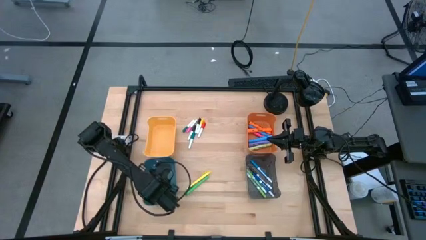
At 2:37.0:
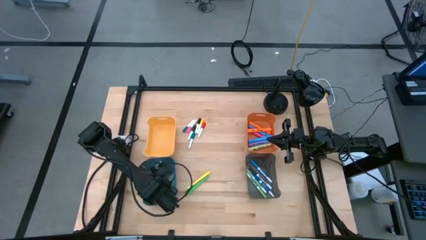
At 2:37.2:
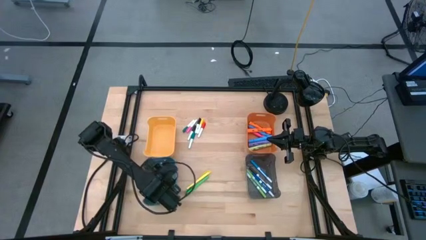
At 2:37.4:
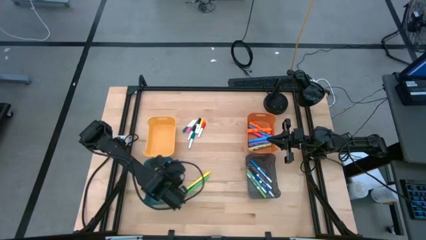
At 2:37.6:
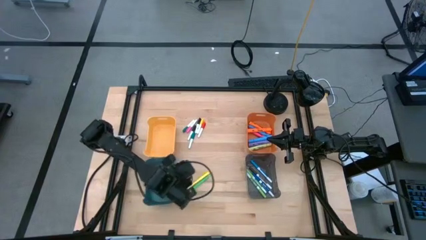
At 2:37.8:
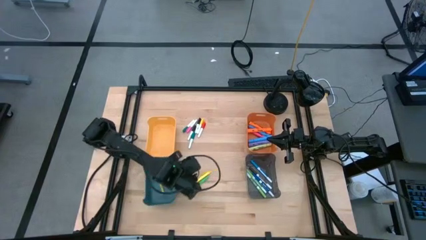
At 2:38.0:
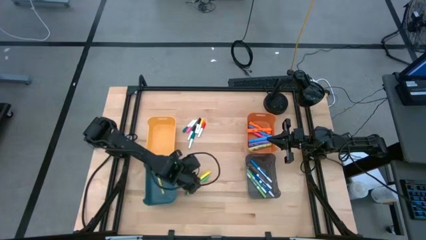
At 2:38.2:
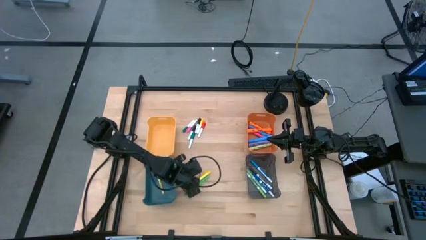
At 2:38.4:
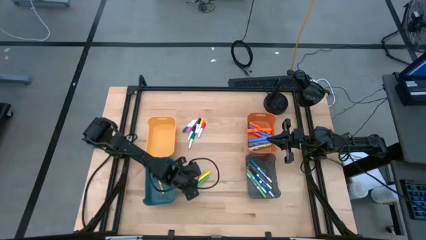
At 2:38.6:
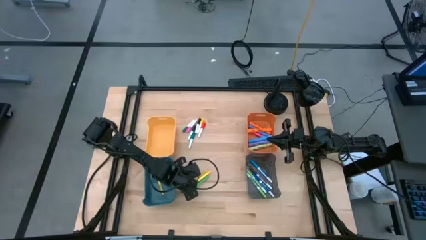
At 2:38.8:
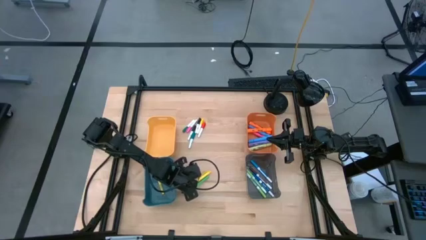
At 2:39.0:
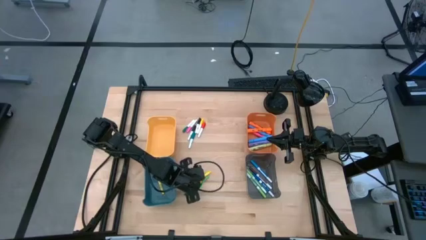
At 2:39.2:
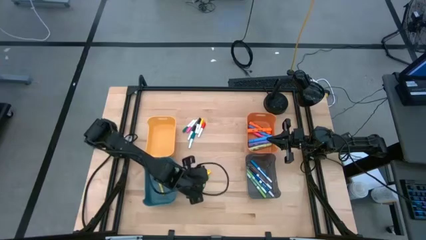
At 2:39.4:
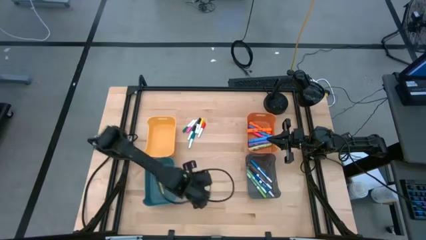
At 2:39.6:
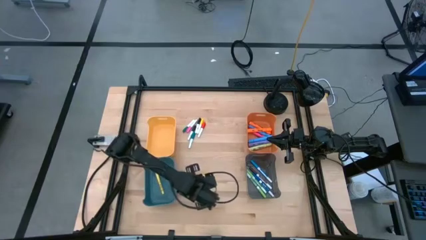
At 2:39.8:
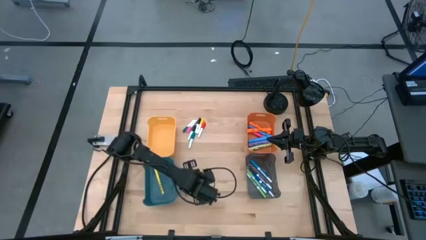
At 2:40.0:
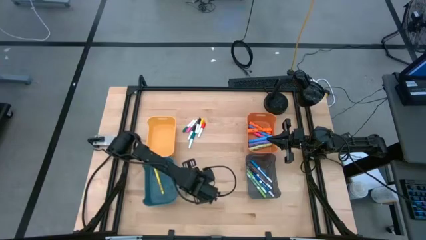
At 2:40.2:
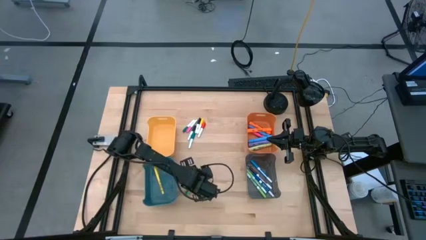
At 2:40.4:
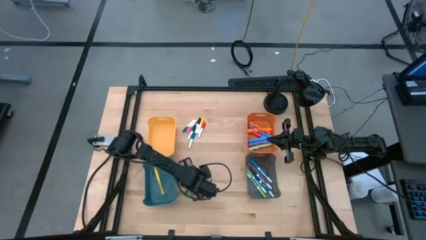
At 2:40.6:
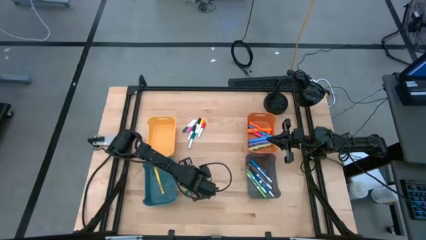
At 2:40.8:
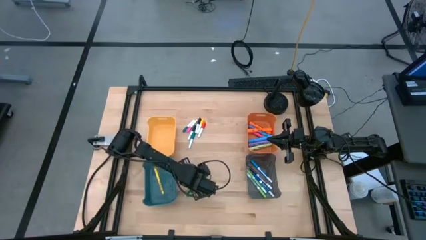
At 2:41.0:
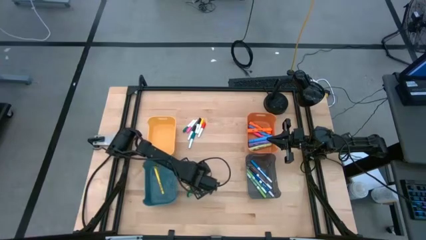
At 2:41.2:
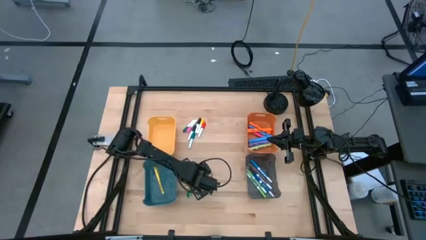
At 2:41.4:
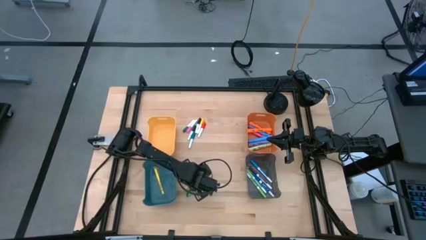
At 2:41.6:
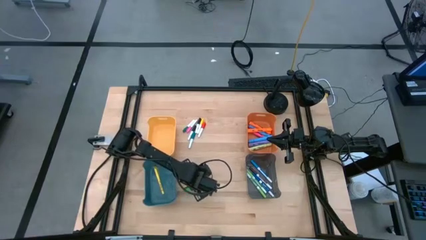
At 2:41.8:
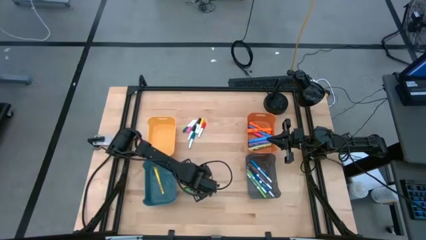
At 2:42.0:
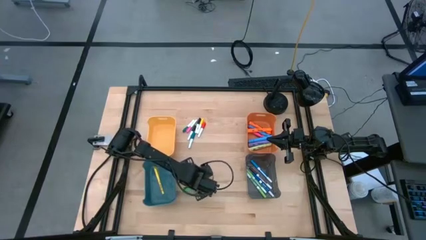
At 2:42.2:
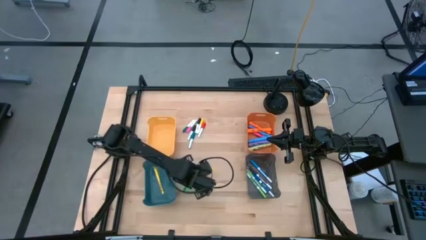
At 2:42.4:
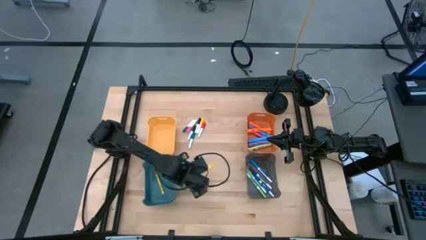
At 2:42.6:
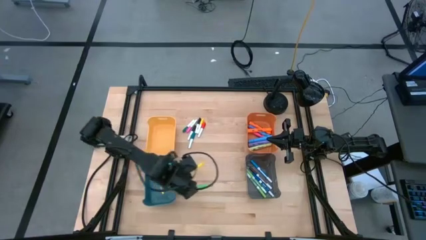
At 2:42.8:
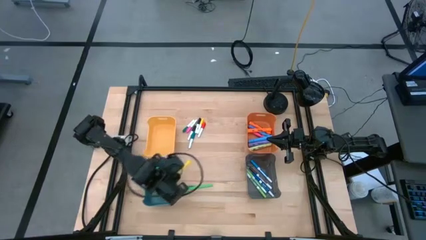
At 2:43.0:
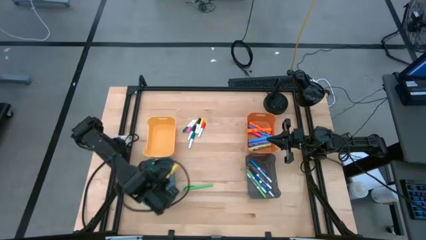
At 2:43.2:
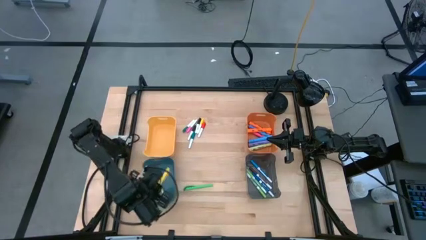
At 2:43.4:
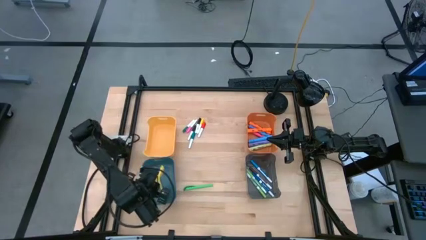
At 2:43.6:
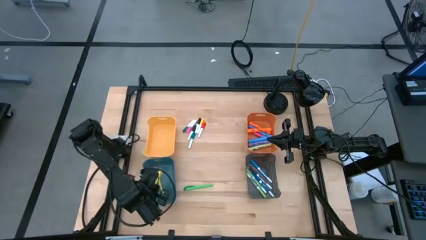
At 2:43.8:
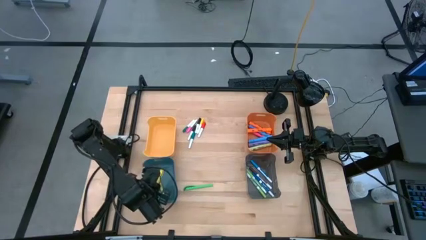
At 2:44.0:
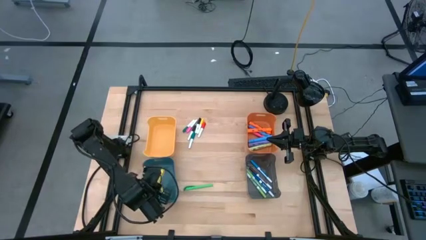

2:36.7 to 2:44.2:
Task: Pick & Place Markers
Put the yellow pen into the blue bin

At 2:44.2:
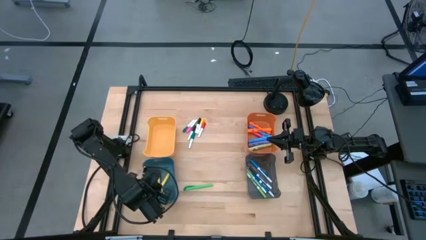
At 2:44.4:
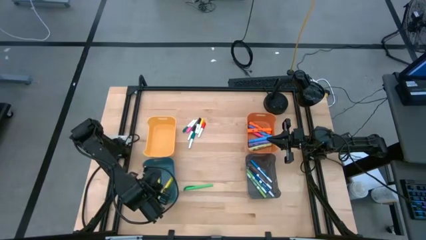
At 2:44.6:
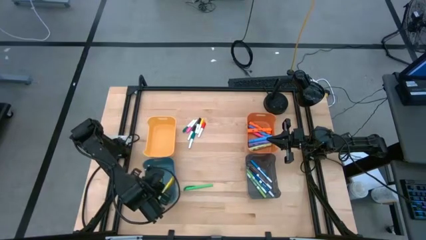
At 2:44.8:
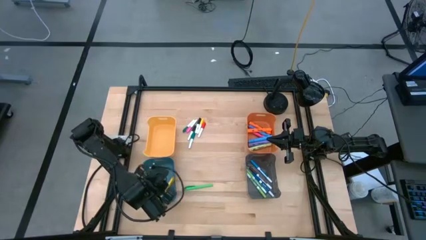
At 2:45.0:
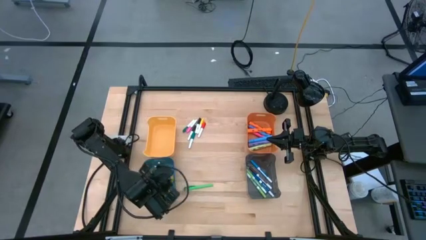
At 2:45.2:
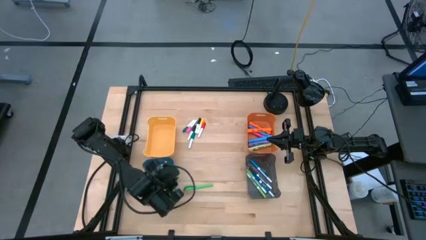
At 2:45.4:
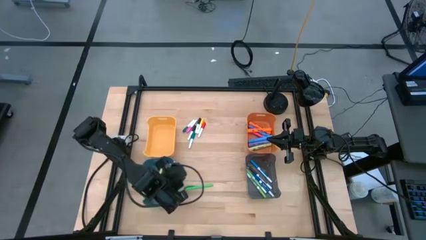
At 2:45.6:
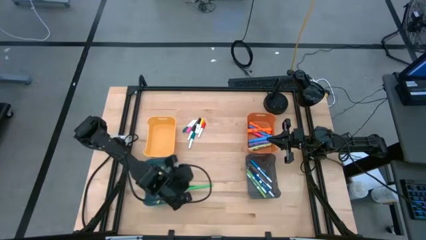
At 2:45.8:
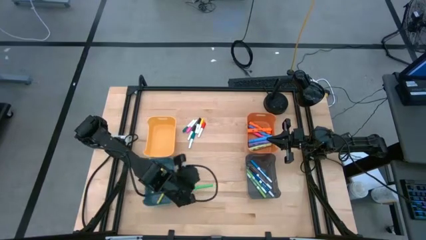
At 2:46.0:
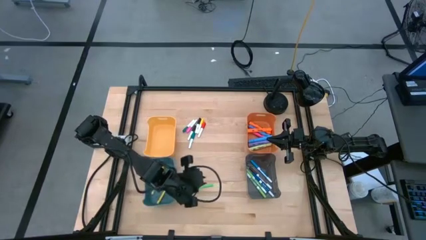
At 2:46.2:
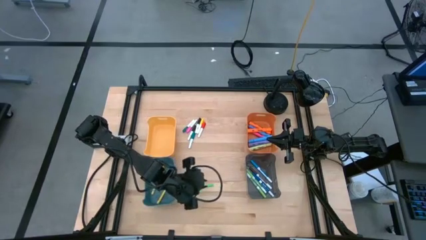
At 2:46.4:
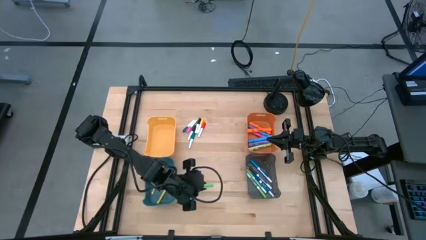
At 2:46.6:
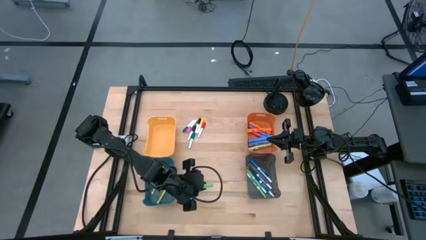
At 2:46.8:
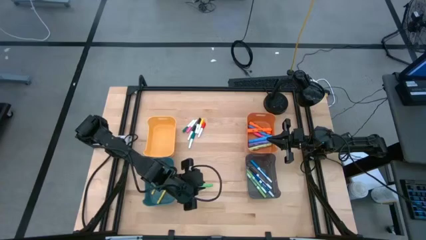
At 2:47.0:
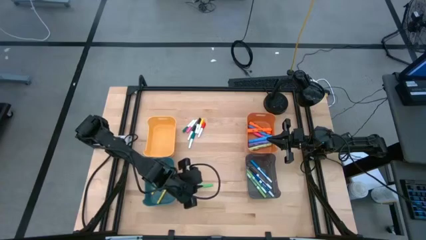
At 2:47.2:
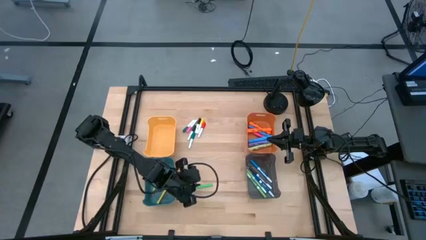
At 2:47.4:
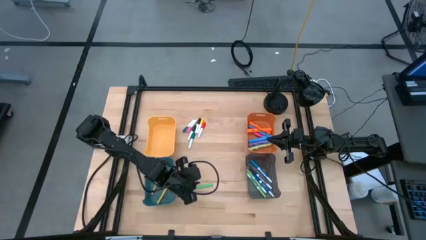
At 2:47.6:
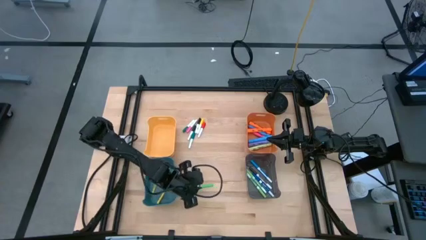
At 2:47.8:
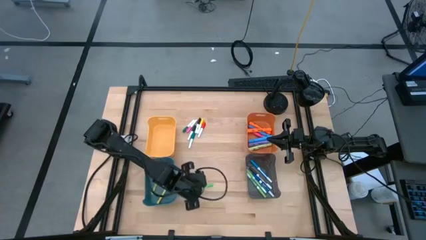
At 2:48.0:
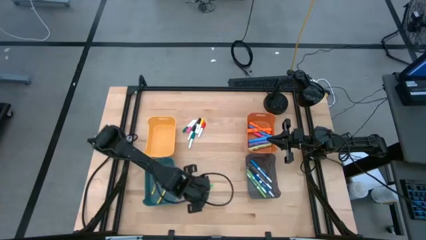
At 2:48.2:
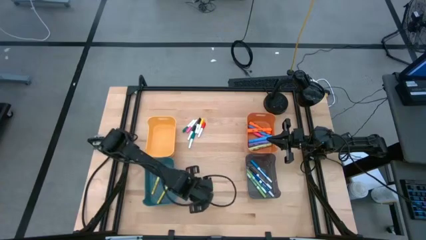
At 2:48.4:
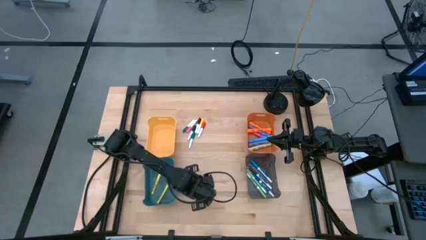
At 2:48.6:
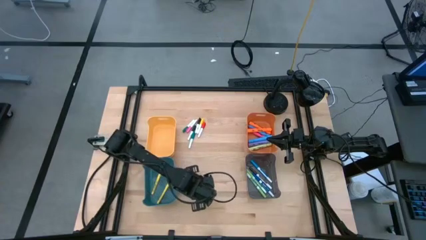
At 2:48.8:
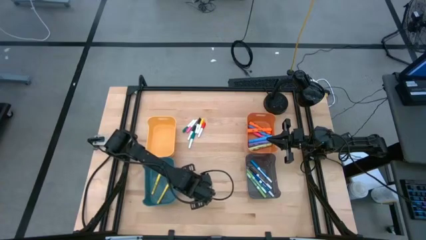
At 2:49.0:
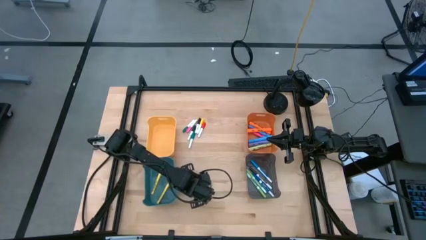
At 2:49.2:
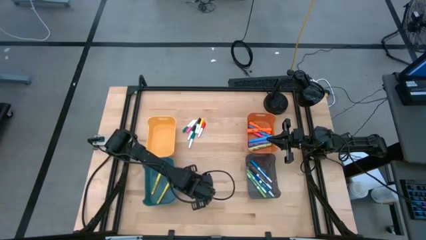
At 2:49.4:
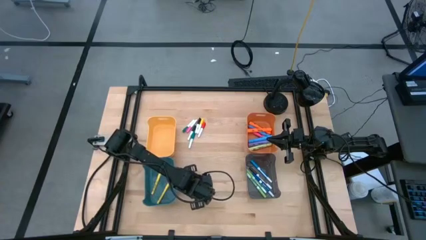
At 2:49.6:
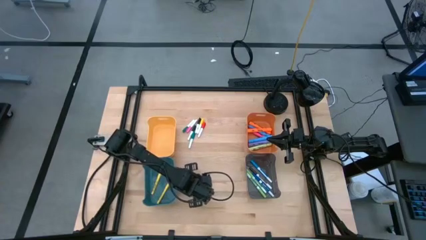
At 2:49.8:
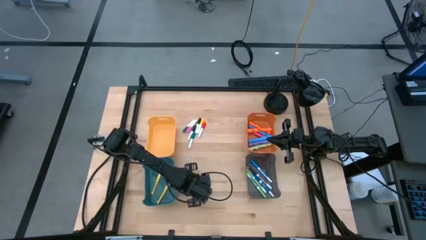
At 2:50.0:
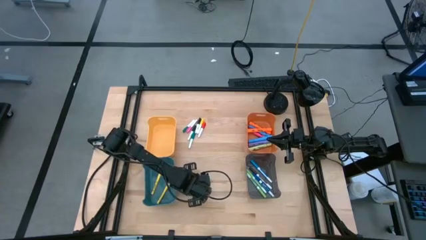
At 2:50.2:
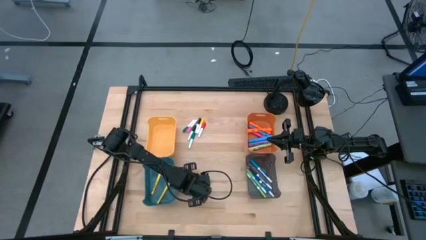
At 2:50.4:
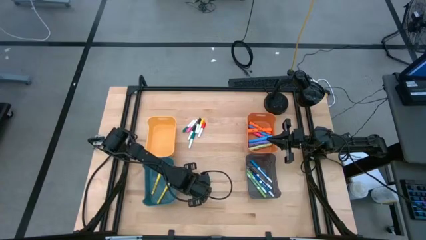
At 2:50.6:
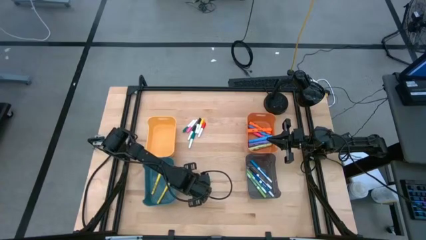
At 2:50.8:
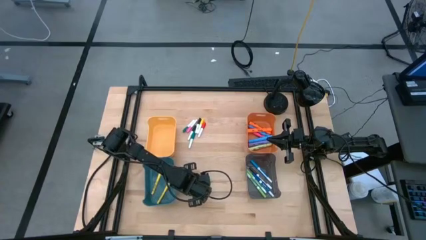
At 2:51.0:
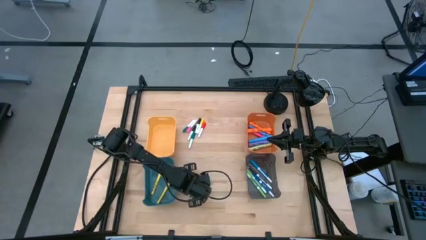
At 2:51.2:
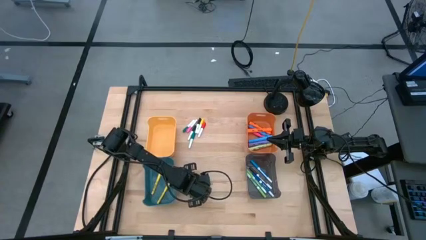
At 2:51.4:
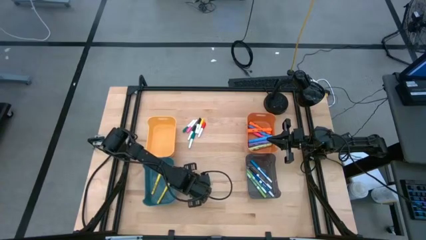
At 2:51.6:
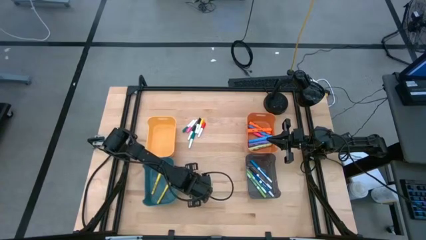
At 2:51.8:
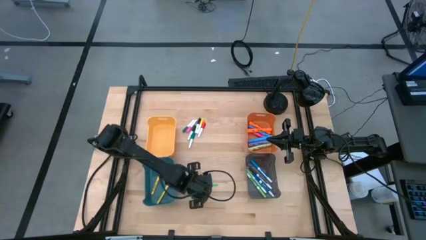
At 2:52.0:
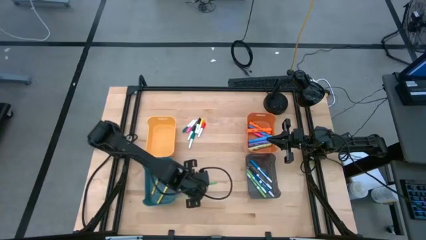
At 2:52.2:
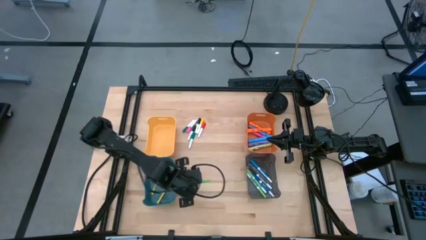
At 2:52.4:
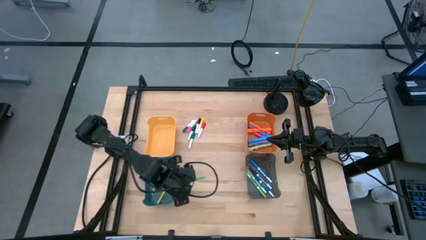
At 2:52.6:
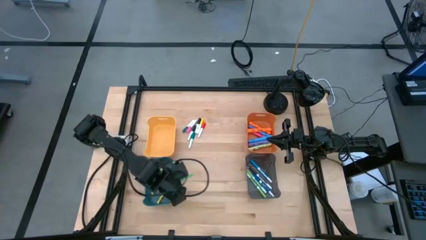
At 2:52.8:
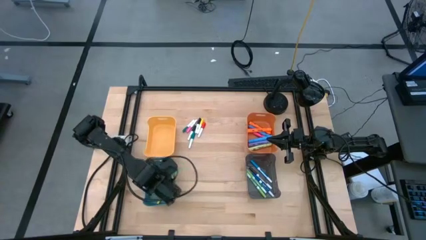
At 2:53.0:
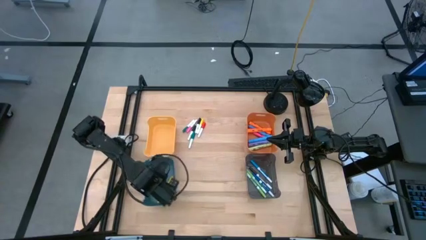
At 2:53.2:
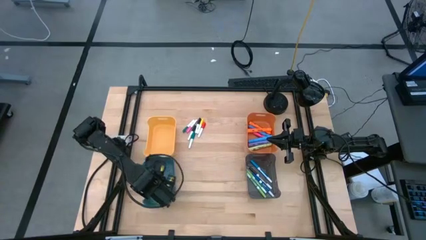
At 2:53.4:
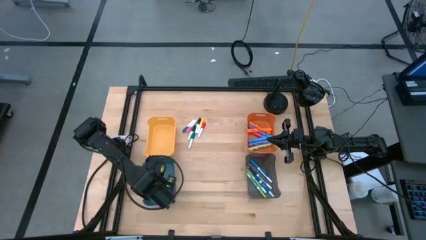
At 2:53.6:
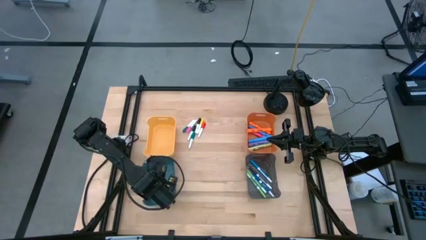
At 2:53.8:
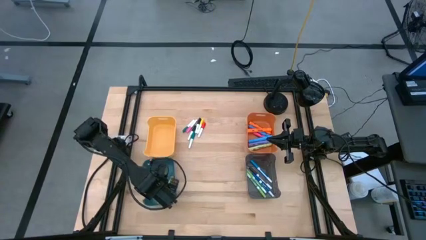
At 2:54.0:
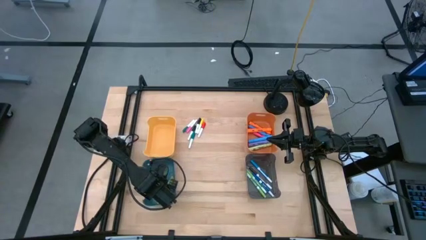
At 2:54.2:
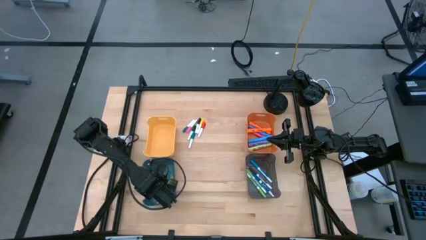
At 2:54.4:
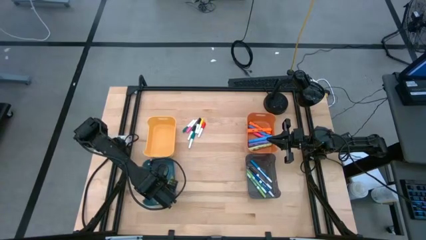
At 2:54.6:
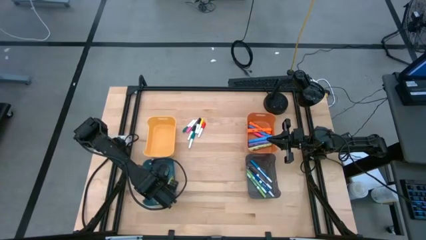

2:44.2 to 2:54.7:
Put the green pen into the blue bin
